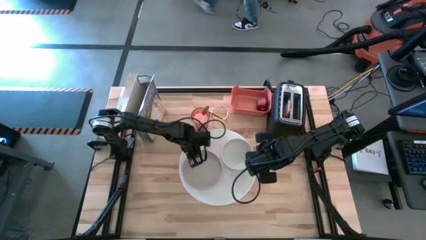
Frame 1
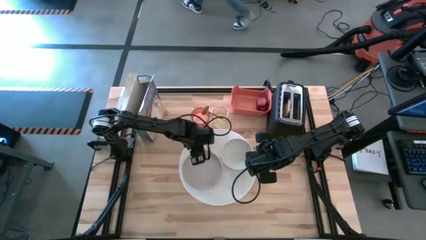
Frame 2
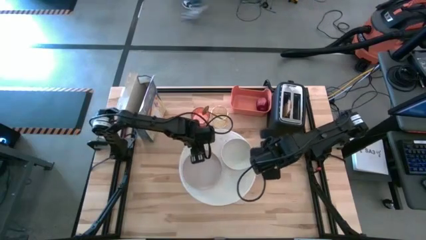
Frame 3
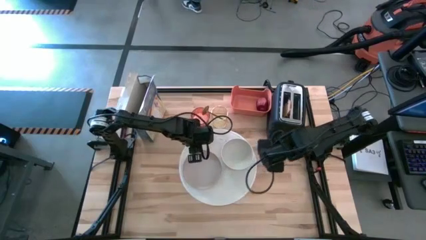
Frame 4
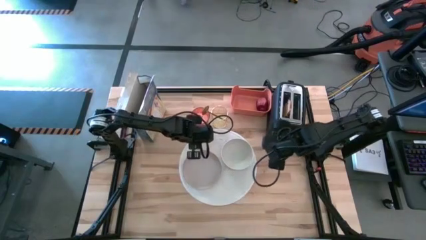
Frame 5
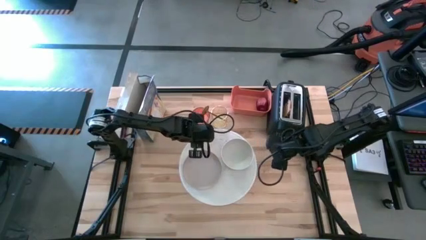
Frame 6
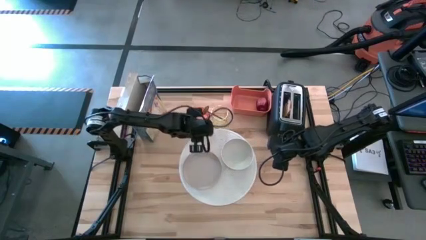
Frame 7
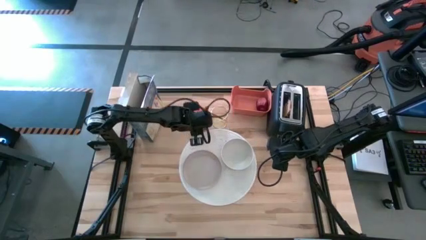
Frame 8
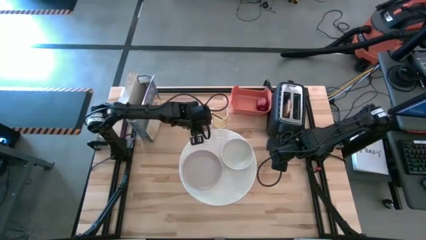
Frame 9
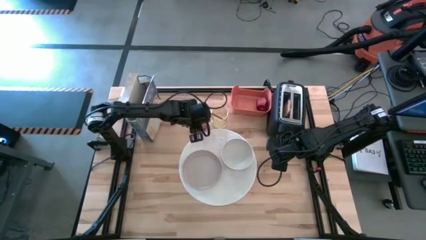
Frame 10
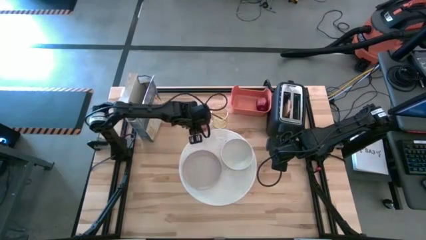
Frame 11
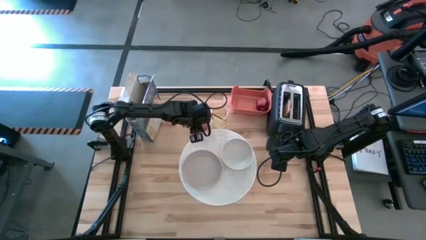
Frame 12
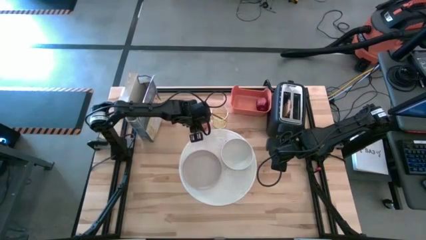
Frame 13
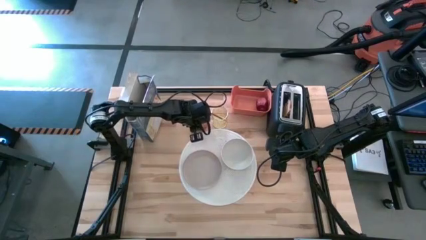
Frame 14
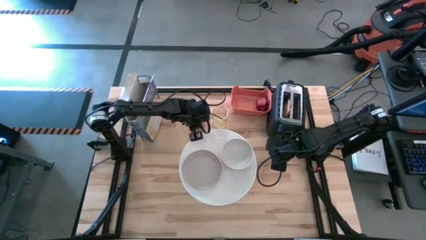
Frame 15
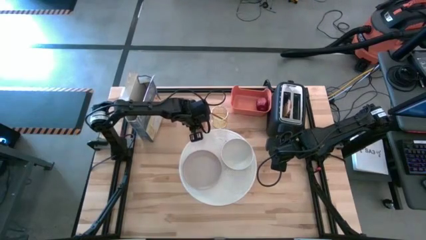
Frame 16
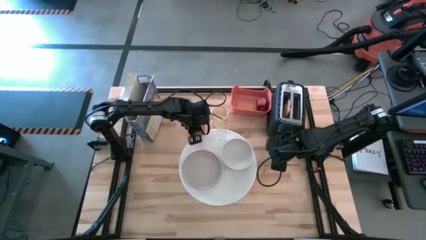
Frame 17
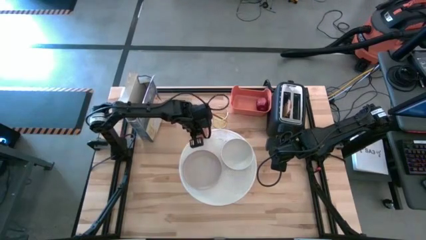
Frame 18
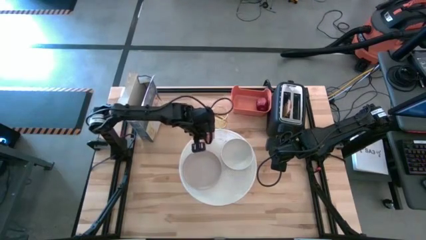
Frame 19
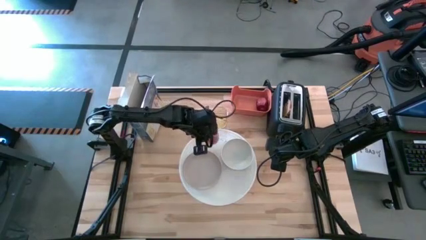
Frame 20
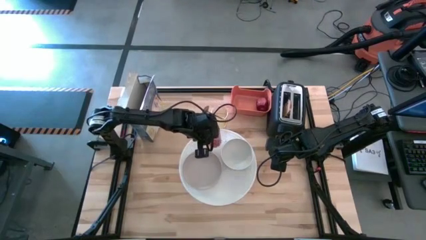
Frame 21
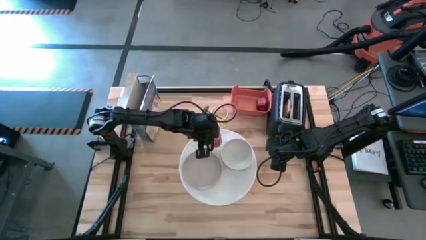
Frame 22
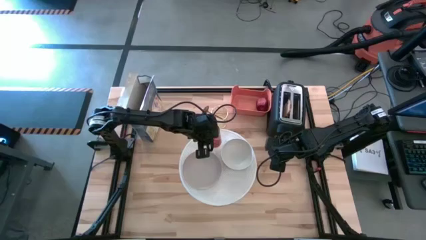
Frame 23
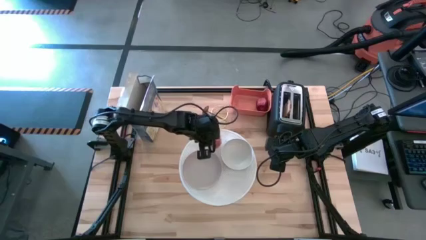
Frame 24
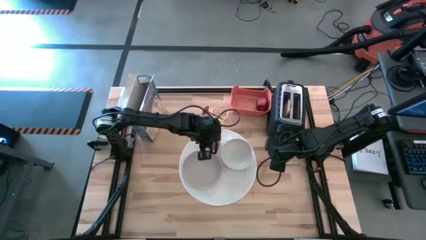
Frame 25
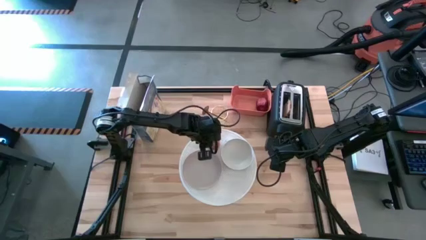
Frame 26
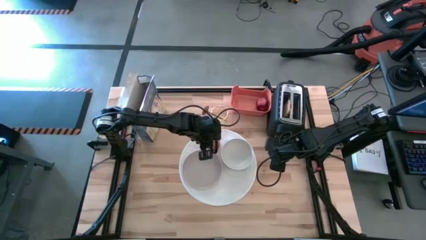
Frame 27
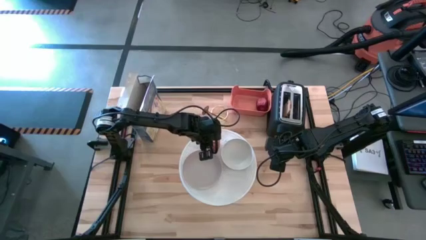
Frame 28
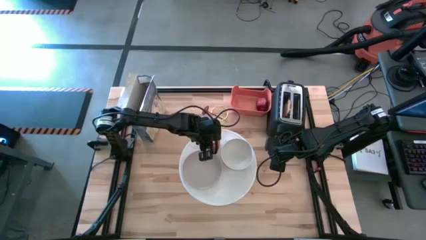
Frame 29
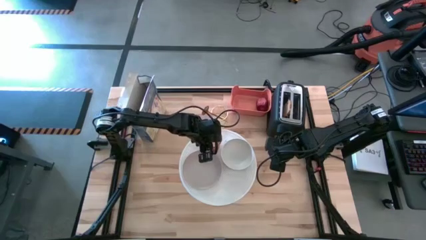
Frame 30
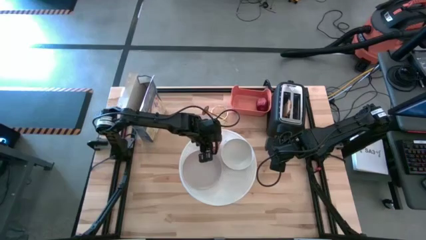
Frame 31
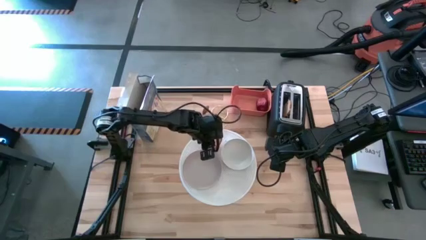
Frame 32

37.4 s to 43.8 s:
Task: Arrange a breakfast setting
Put the orange cup on the white placemat at the top left of the white plate

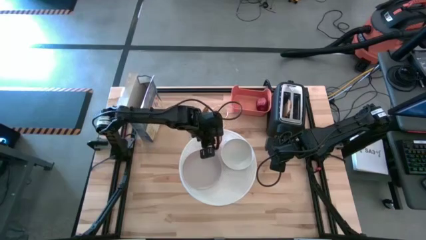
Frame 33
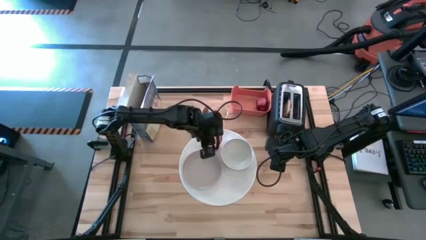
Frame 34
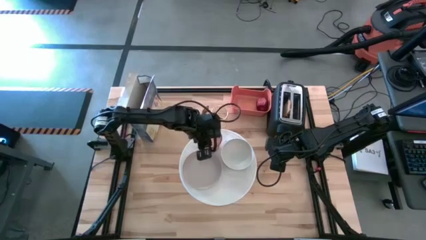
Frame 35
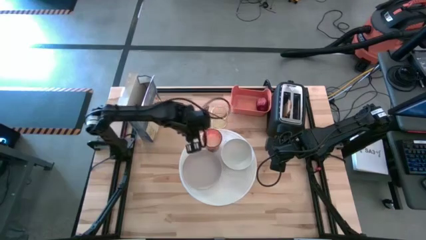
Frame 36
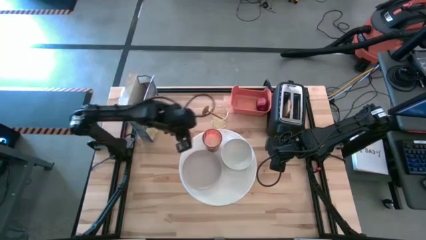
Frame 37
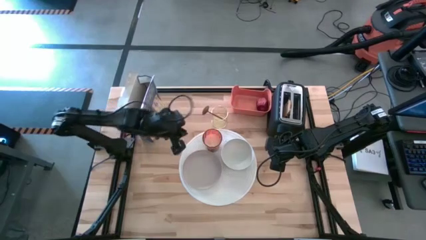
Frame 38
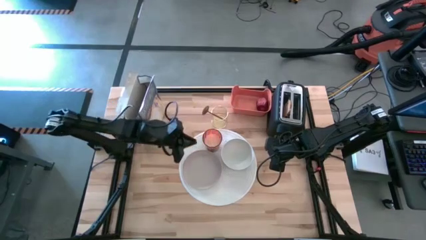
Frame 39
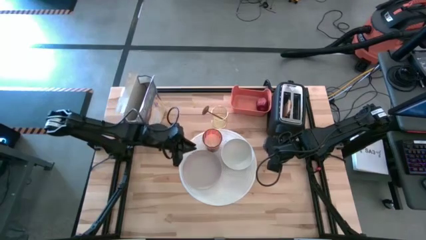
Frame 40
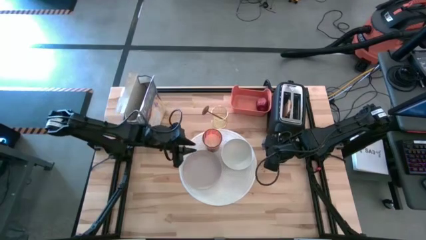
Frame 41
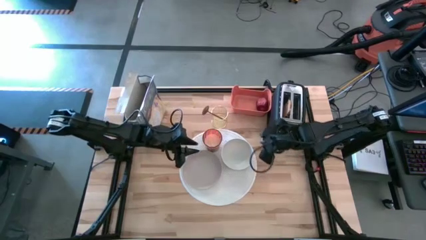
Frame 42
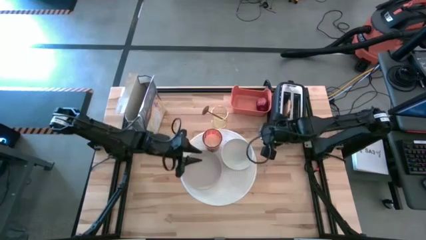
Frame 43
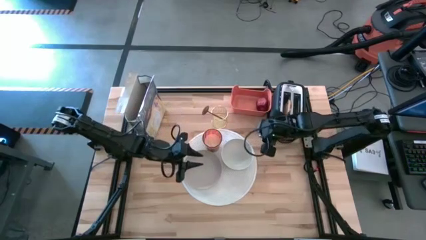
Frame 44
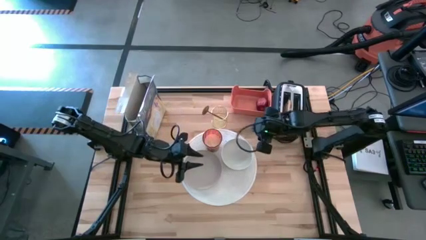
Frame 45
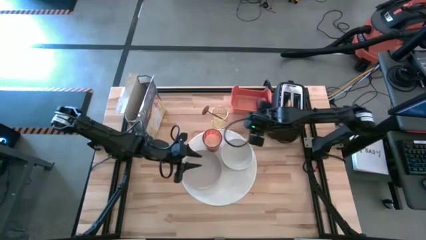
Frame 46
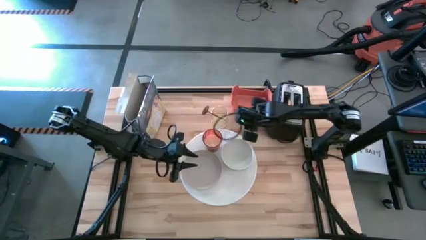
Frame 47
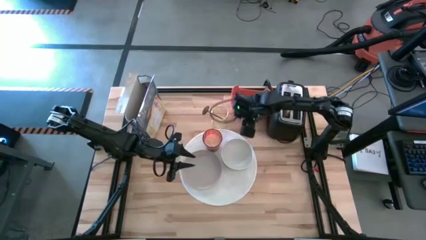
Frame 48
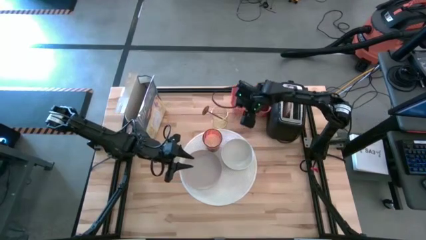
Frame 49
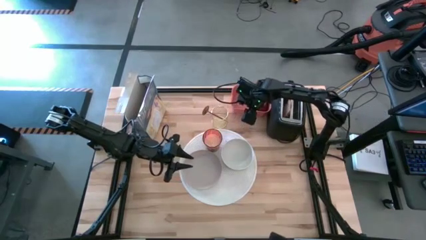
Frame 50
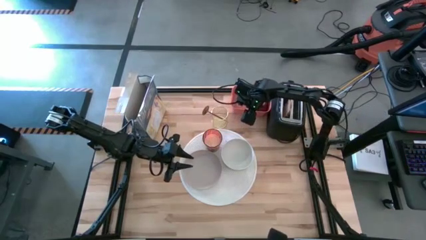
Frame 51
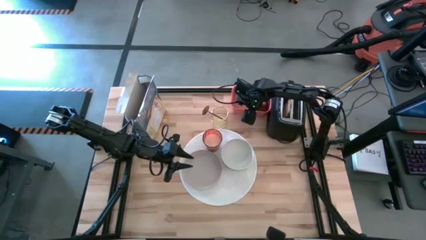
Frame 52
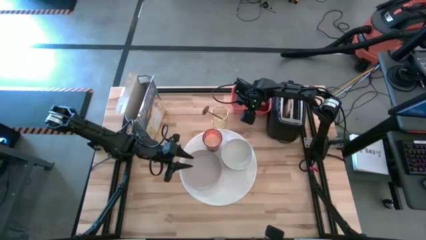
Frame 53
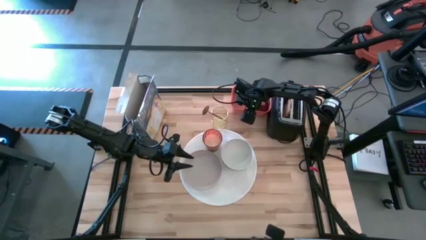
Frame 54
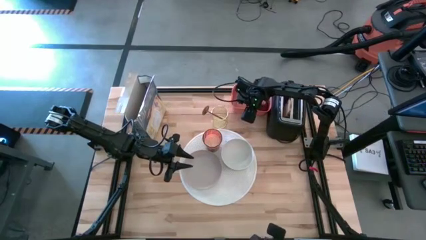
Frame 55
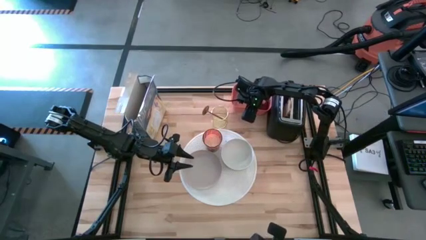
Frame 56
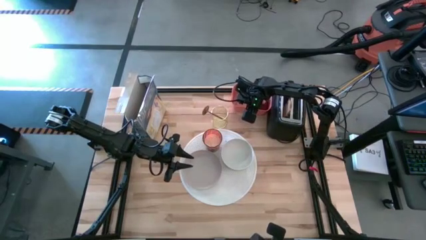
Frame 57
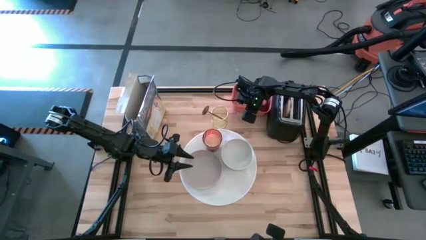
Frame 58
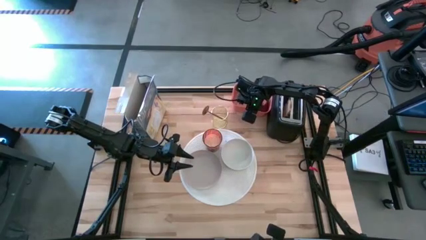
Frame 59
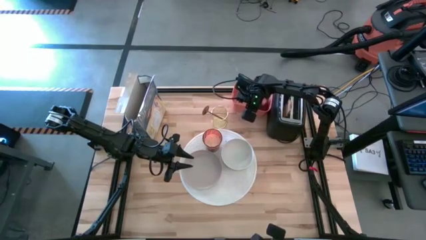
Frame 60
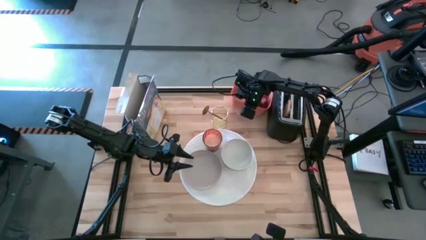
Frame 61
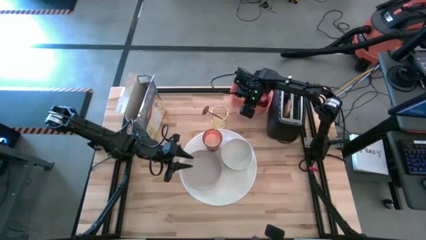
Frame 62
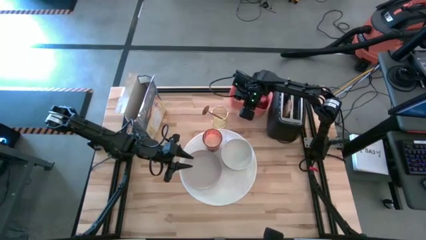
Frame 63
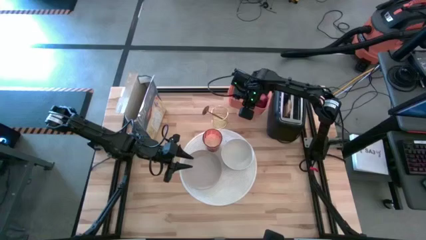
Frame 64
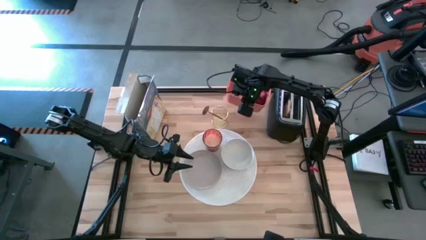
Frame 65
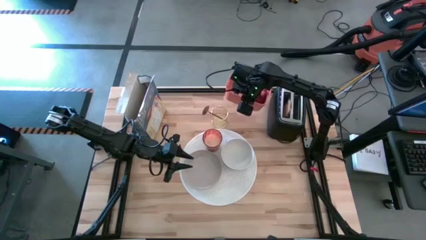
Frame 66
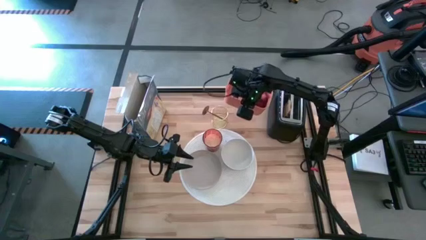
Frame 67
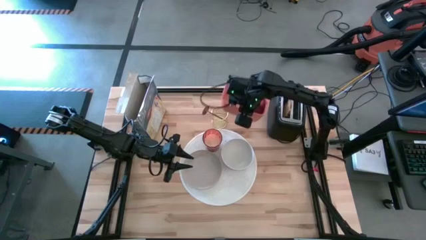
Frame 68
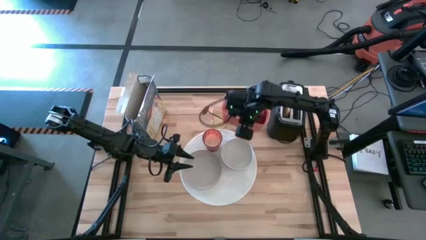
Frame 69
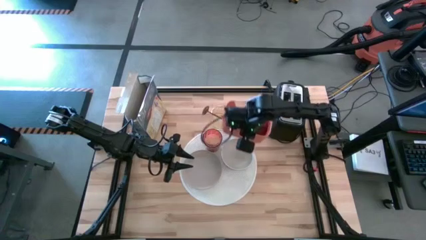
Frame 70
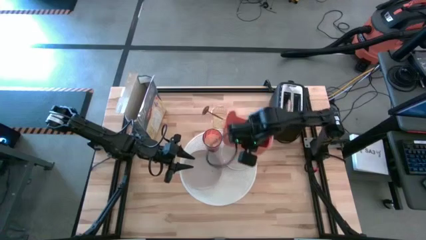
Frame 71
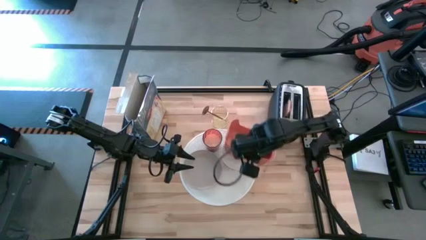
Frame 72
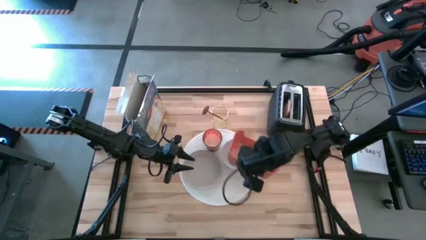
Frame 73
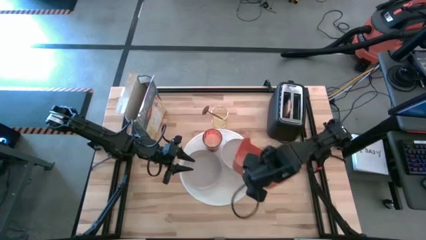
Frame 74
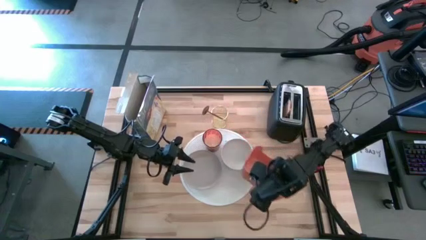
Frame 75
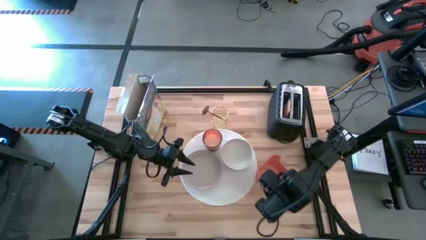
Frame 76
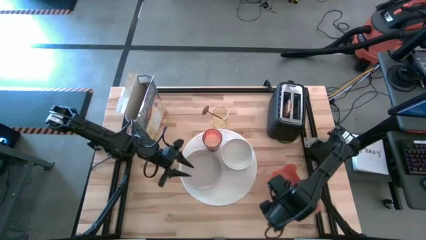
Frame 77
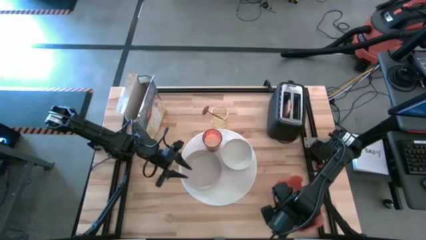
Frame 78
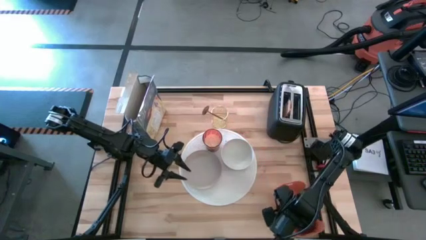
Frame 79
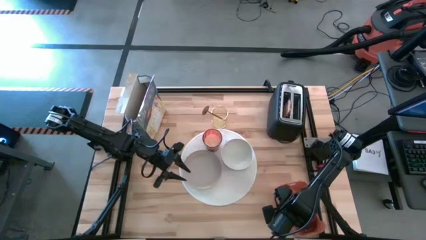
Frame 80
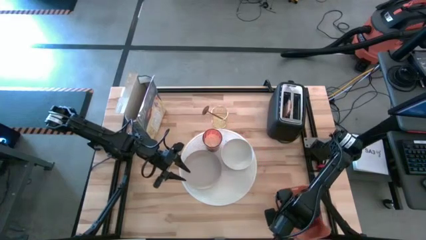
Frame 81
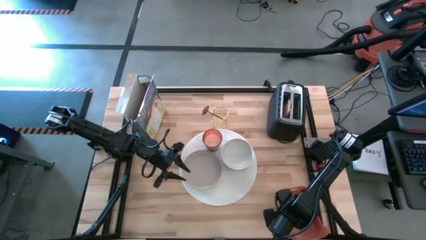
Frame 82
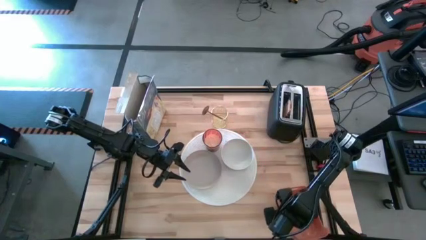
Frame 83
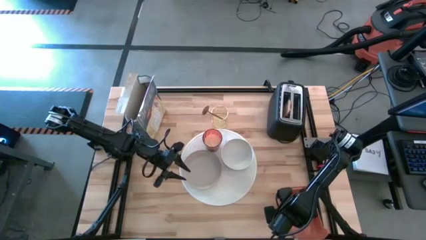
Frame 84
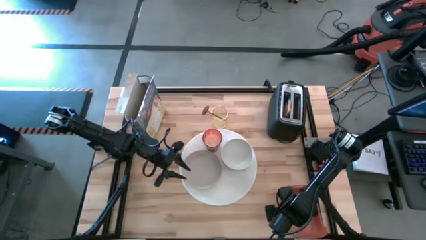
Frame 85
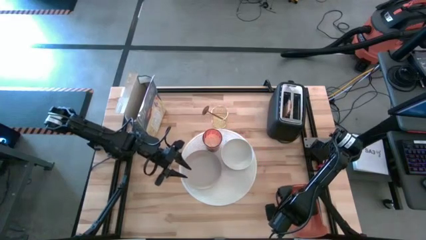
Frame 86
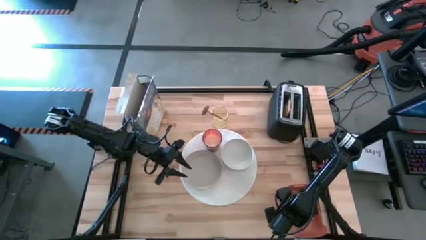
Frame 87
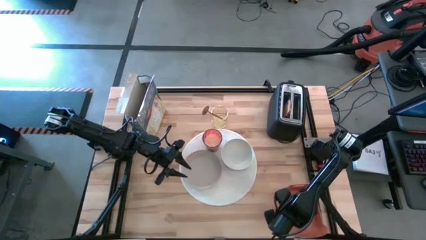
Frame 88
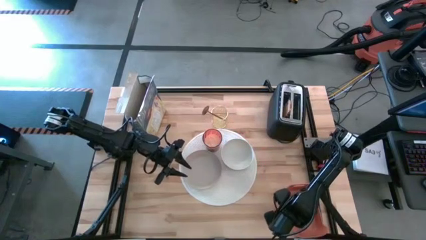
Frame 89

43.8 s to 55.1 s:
Move the orange bin with the red apple to the bottom right of the table
